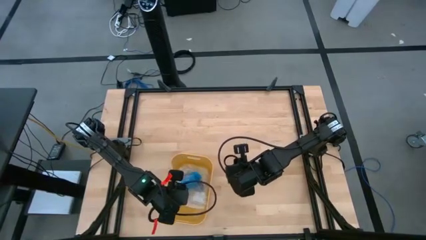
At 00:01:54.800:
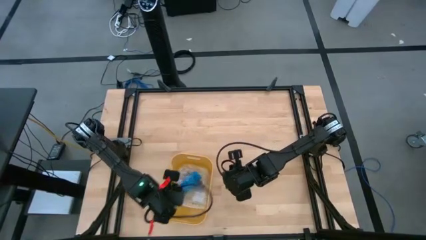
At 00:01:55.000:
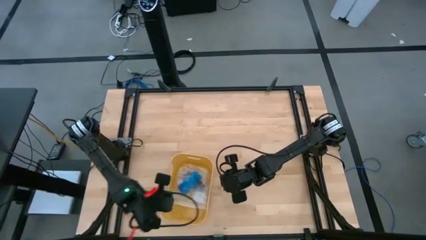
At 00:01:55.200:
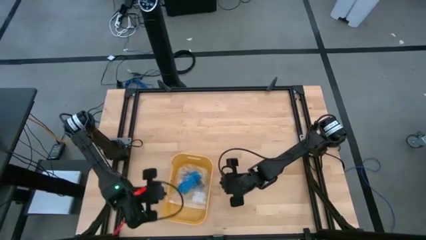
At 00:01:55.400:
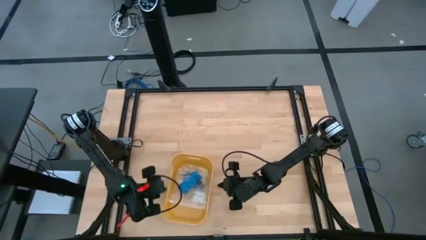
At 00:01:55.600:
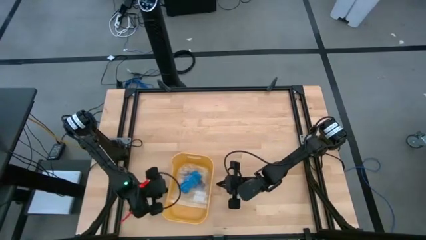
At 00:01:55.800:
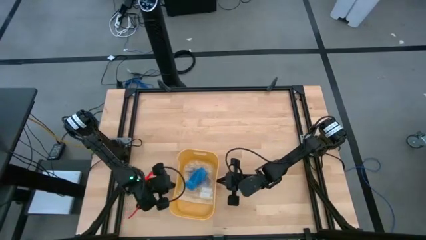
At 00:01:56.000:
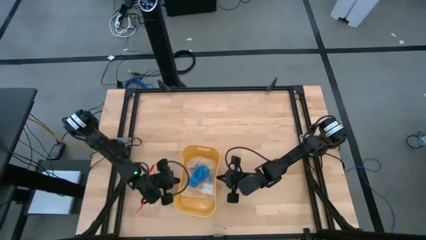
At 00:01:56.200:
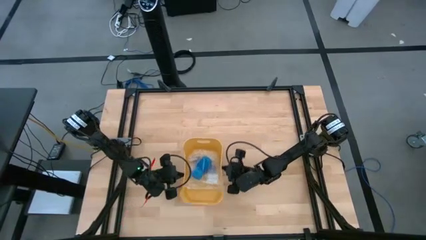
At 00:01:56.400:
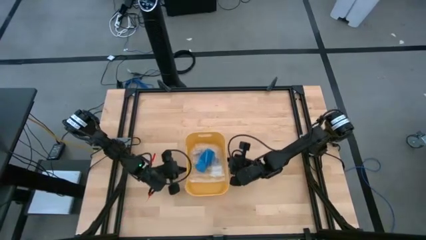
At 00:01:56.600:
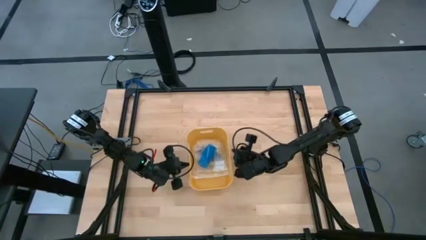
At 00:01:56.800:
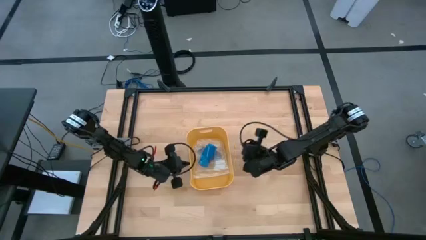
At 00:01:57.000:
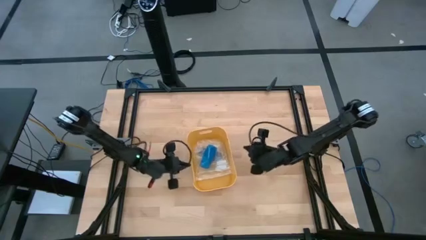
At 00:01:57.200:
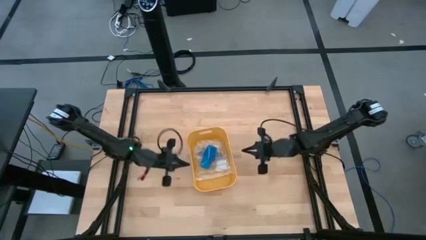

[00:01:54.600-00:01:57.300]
Task: Roll bandage
Move the yellow bin to the middle center of the table

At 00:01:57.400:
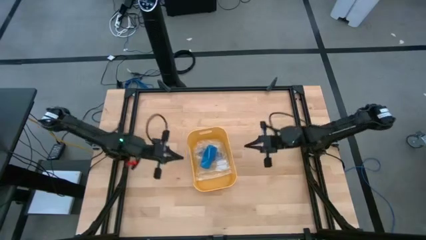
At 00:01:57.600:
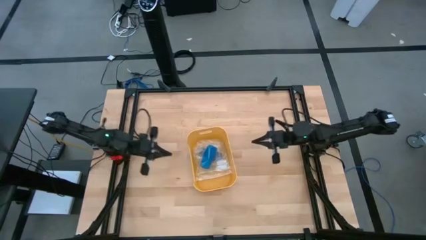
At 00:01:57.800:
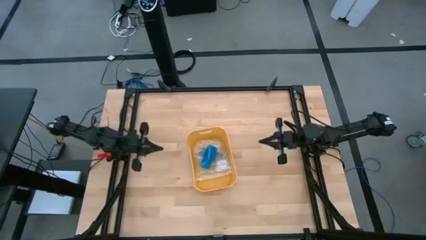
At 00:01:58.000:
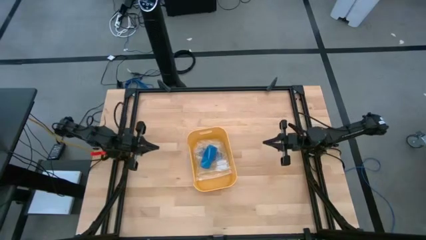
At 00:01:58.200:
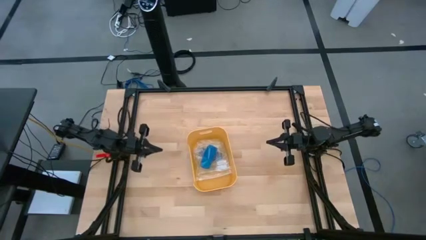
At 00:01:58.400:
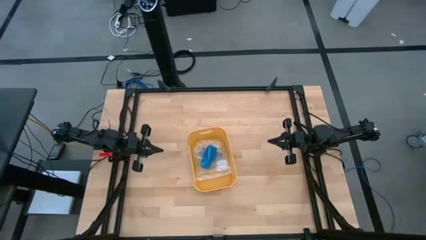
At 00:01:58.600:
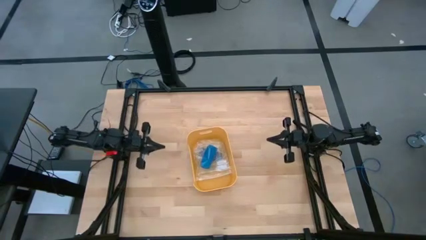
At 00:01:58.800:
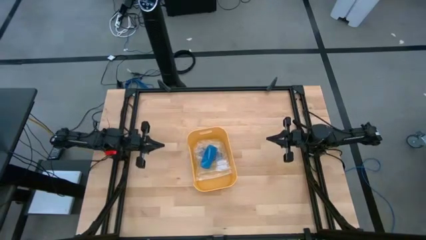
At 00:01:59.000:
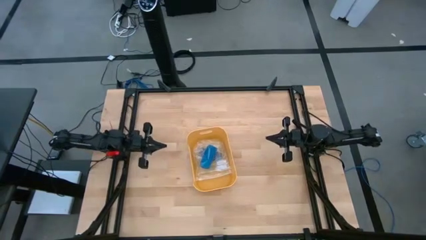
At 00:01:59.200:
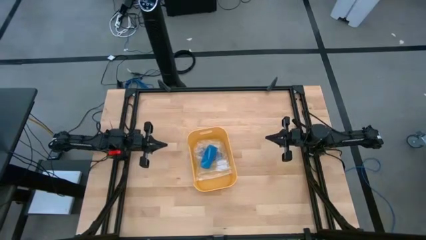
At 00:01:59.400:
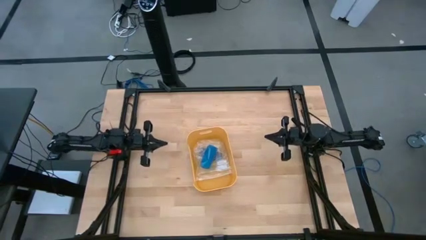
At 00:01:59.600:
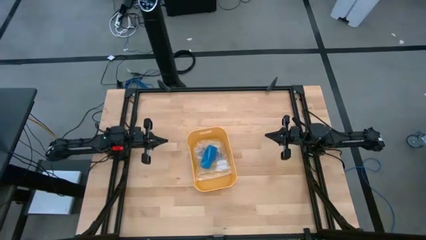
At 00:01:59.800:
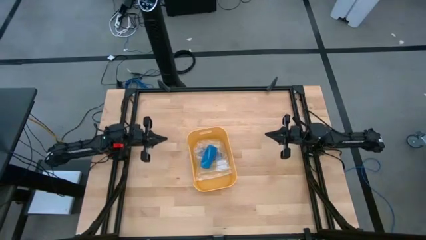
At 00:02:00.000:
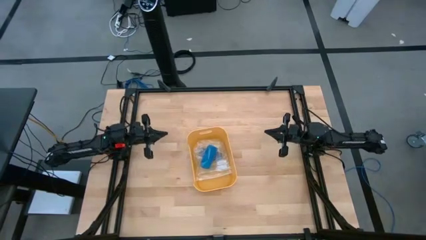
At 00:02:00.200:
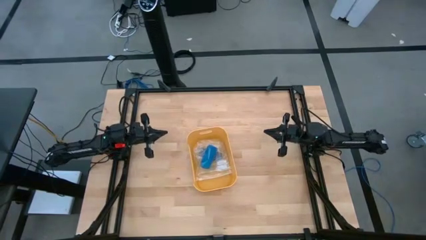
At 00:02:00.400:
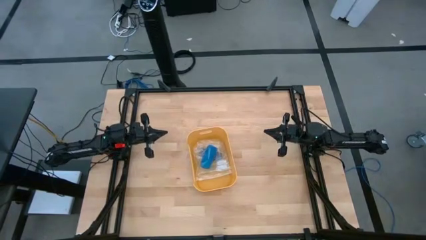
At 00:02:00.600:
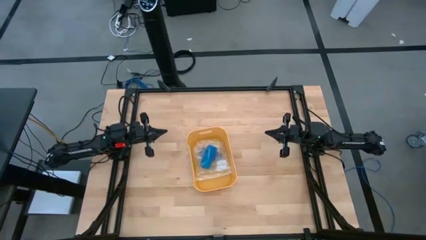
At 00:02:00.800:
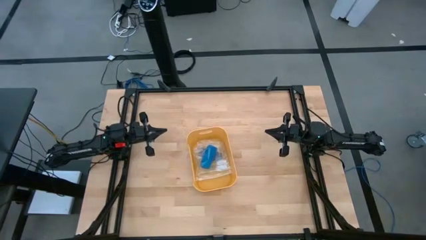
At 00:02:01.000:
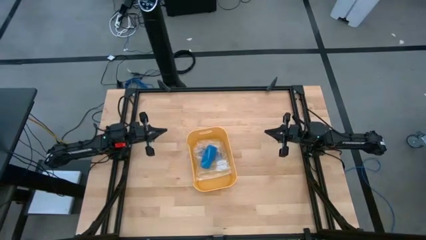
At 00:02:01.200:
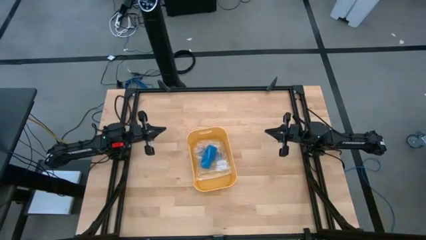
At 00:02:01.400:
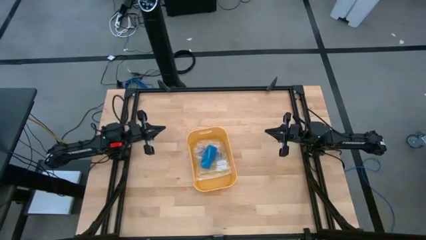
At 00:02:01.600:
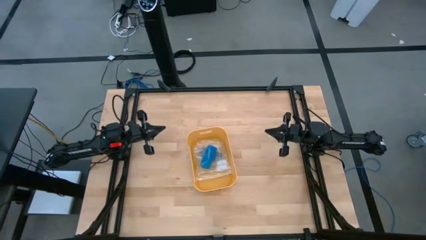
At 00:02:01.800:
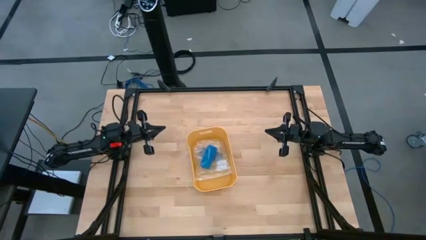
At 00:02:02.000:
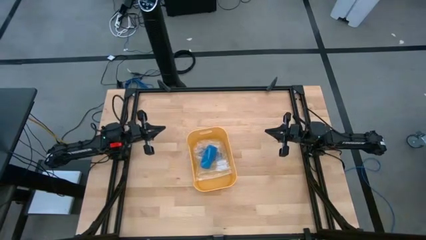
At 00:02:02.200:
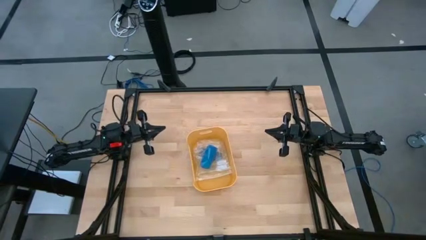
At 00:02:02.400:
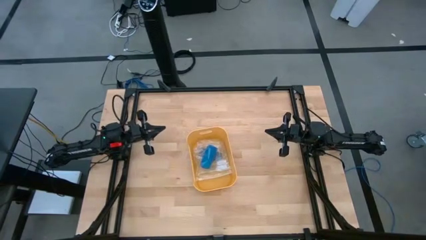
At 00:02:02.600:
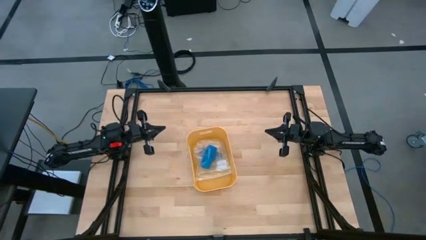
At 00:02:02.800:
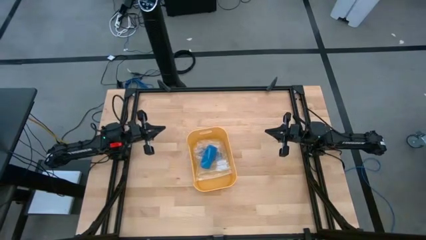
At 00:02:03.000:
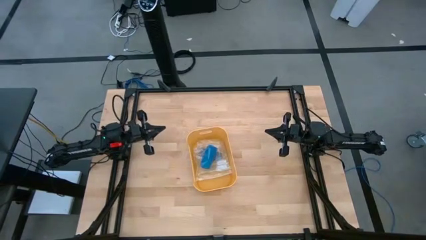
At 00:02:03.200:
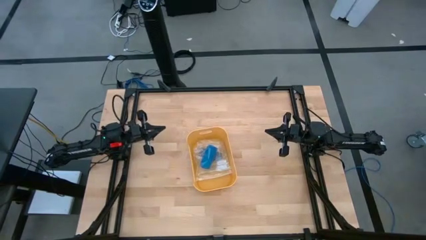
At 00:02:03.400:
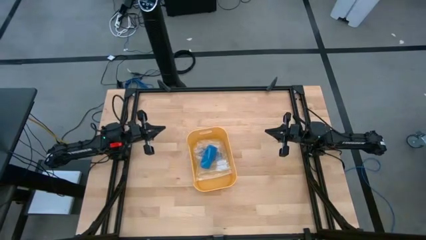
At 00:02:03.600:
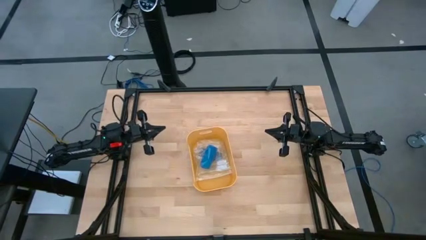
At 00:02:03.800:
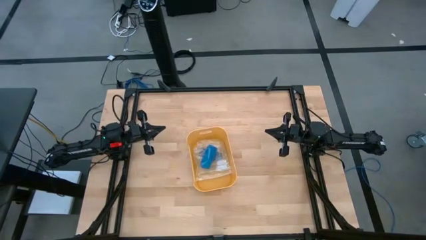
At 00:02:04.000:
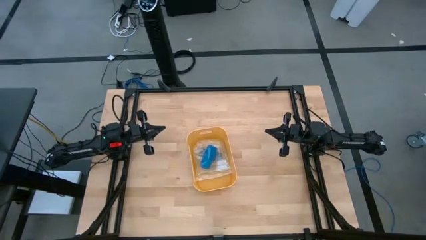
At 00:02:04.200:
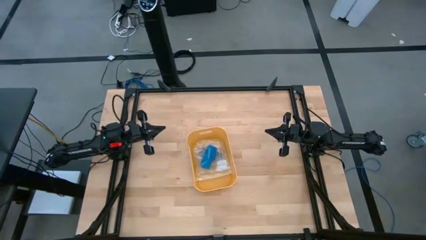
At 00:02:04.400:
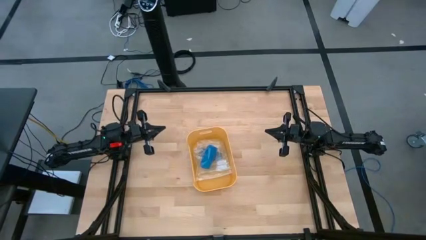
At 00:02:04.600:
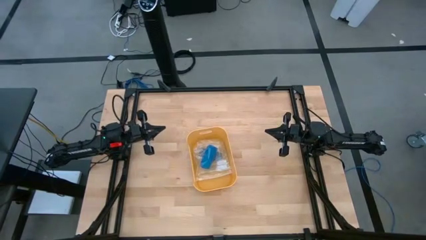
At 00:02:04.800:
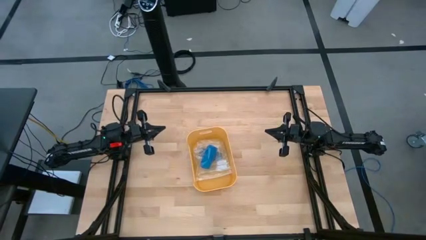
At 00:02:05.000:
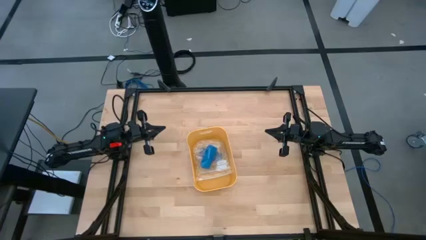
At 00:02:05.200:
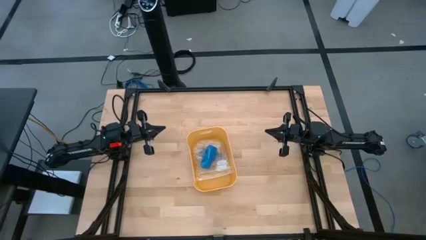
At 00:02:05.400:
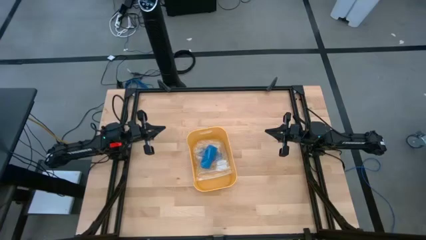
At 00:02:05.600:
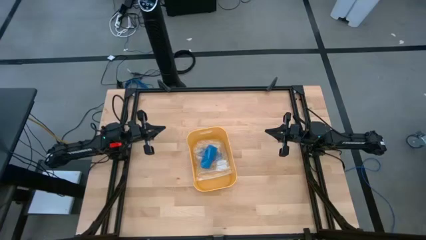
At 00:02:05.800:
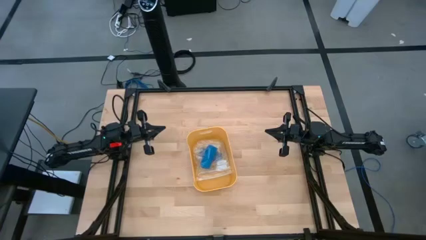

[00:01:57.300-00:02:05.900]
Return to Home Position

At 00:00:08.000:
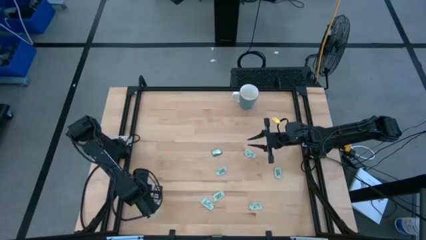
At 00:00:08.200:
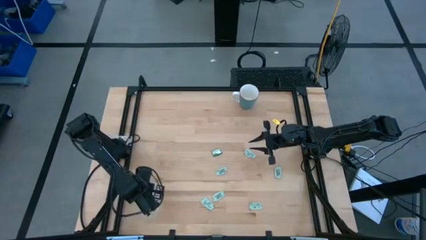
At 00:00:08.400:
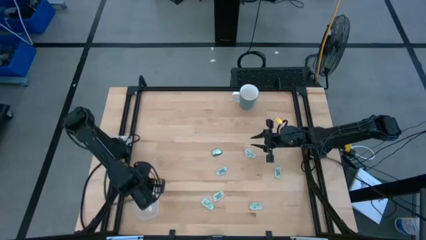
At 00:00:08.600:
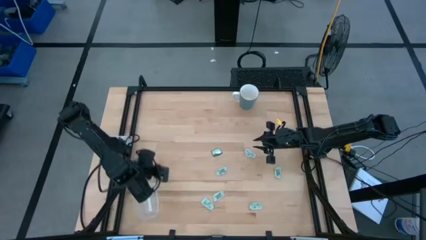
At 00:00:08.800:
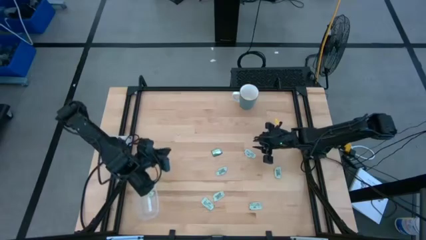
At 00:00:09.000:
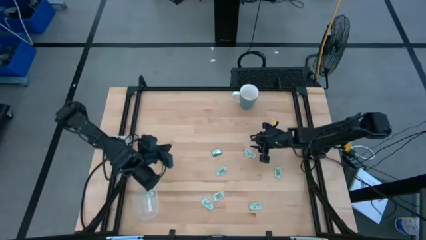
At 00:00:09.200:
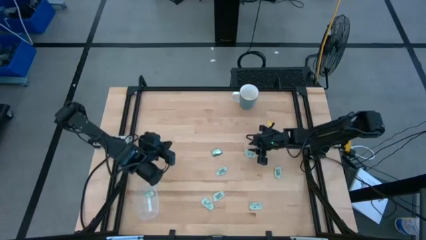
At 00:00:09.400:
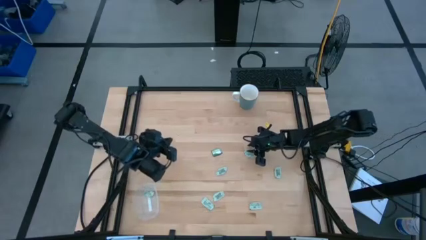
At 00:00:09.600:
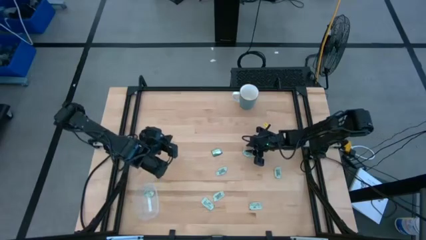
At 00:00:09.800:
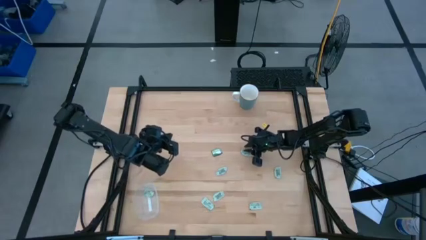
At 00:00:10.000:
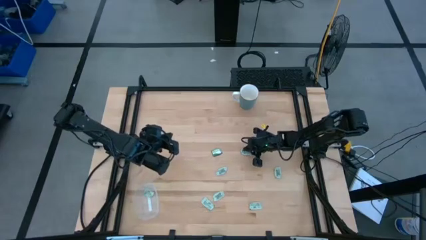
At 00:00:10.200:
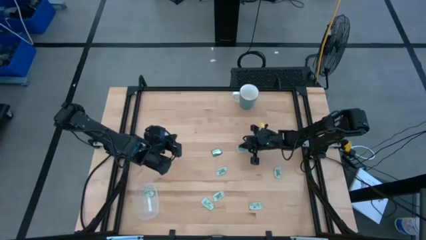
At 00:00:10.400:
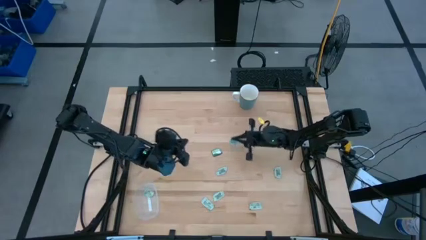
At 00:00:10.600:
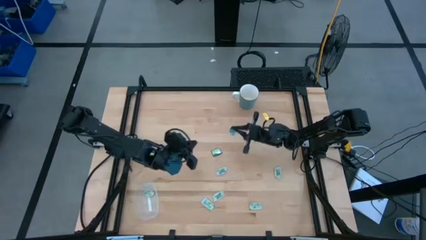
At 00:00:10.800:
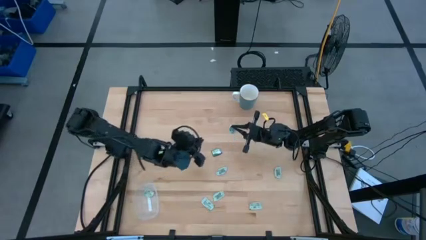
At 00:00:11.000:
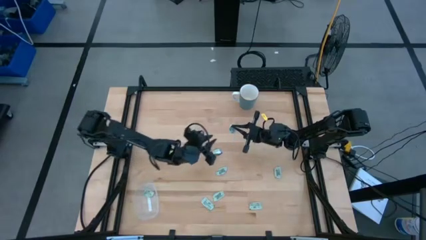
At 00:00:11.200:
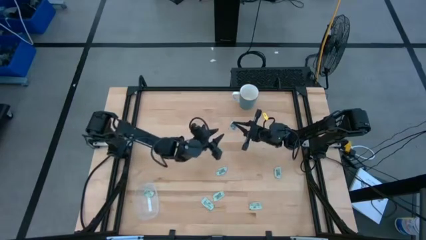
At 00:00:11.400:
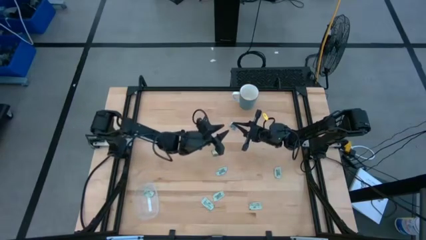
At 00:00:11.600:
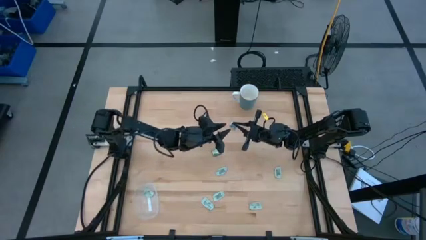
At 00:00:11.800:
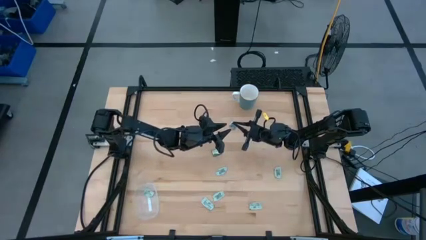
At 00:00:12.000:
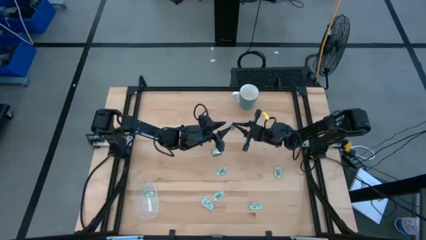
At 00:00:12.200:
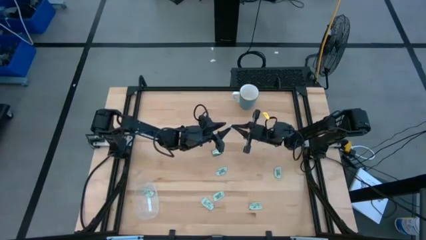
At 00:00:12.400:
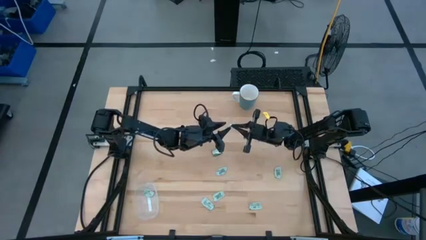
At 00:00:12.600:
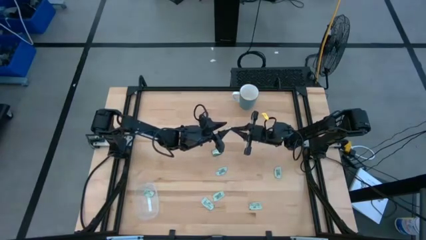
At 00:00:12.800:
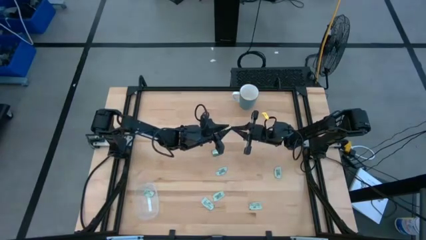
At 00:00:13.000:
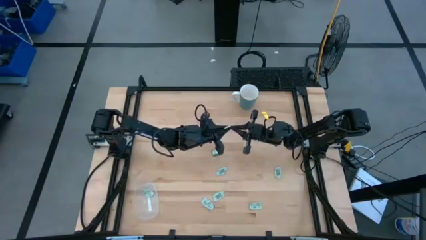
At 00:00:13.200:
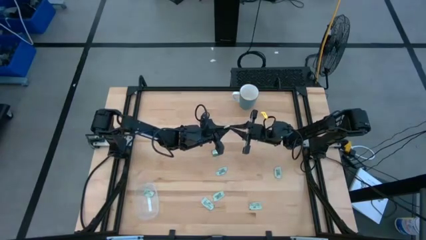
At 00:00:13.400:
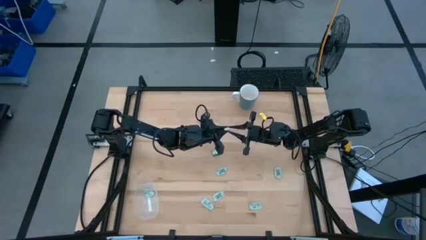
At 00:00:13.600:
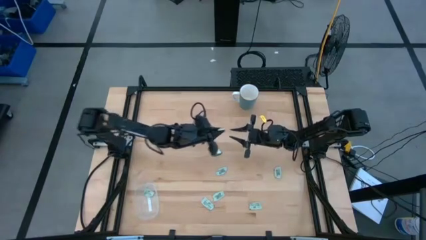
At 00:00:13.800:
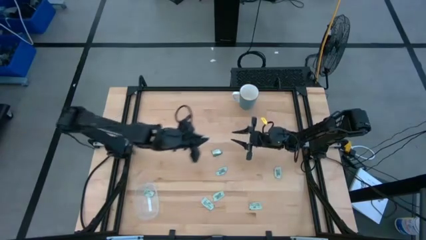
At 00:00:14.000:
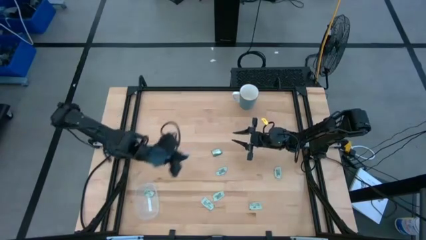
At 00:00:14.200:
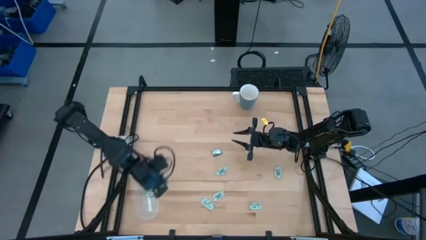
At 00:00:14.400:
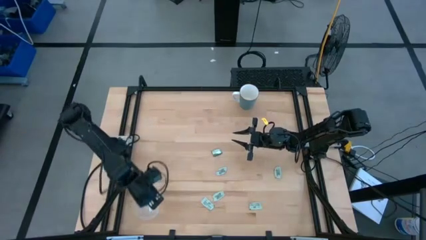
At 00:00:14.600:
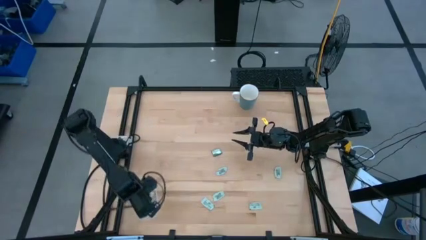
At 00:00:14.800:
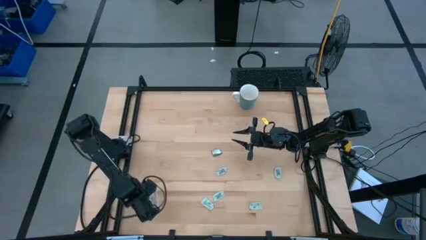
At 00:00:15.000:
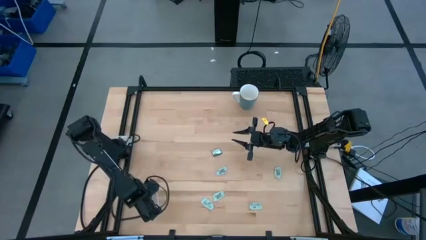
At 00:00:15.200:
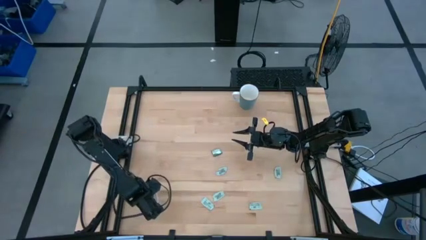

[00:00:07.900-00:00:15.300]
Task: Pick and place Stevia / Truvia into bins
Put the stevia packet into the transparent container
